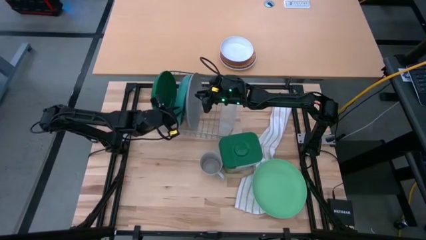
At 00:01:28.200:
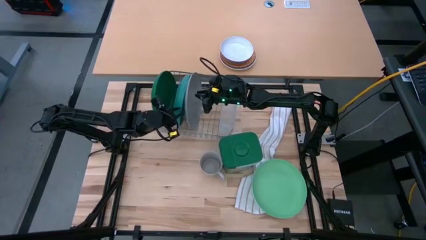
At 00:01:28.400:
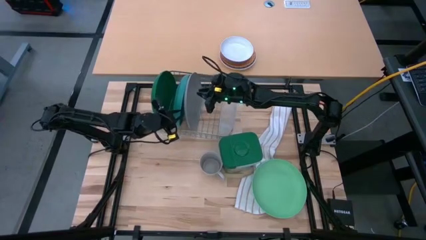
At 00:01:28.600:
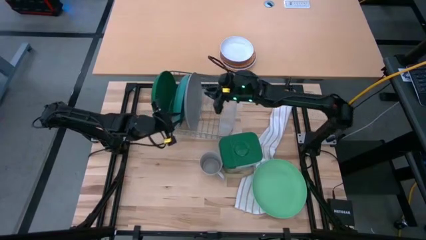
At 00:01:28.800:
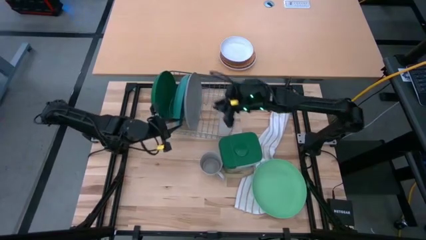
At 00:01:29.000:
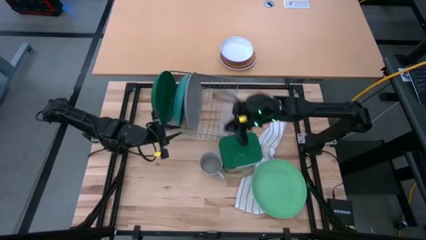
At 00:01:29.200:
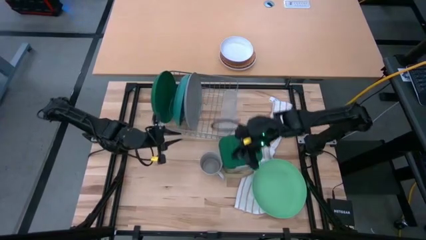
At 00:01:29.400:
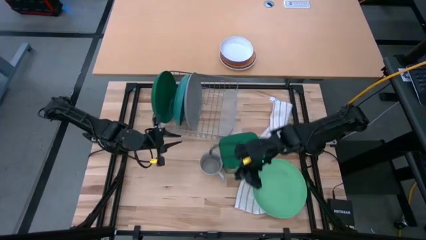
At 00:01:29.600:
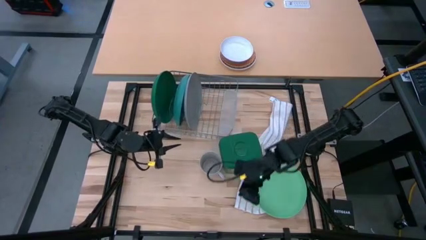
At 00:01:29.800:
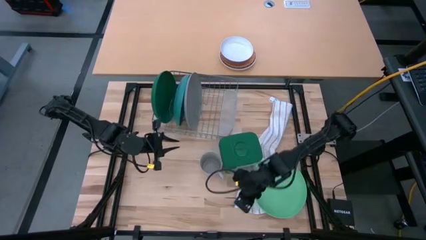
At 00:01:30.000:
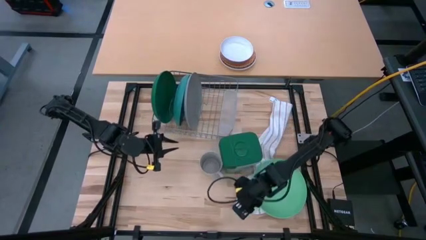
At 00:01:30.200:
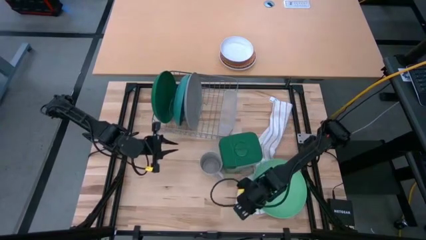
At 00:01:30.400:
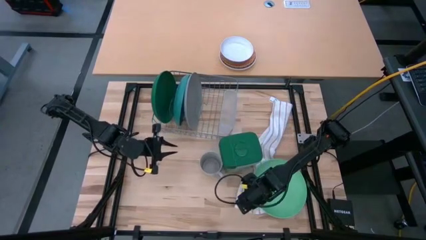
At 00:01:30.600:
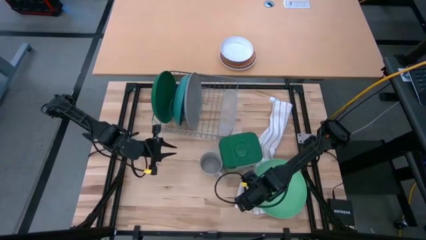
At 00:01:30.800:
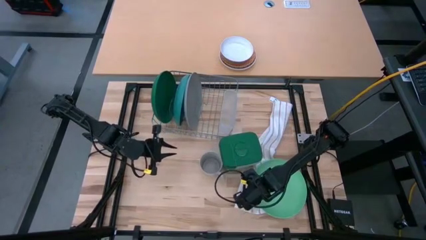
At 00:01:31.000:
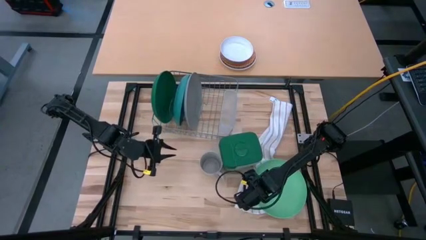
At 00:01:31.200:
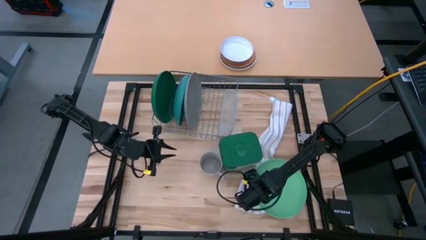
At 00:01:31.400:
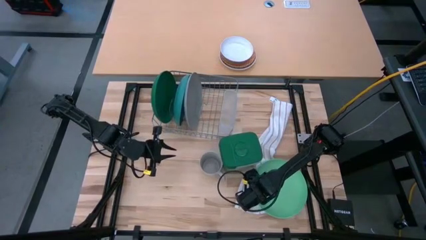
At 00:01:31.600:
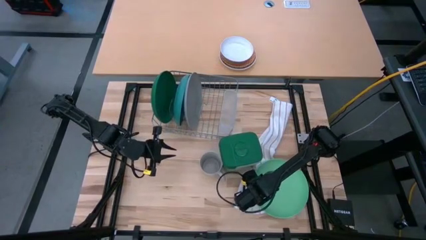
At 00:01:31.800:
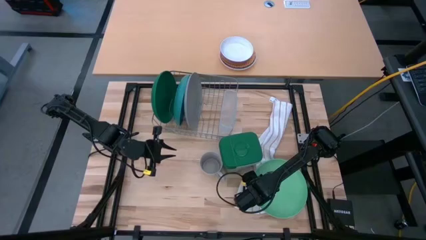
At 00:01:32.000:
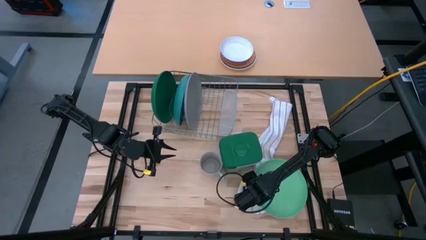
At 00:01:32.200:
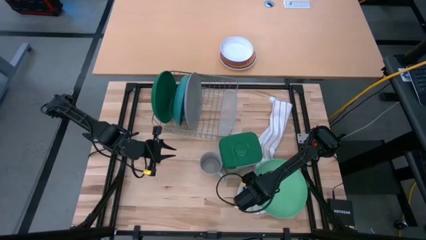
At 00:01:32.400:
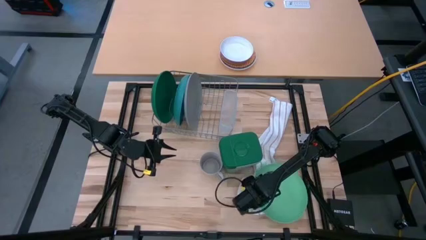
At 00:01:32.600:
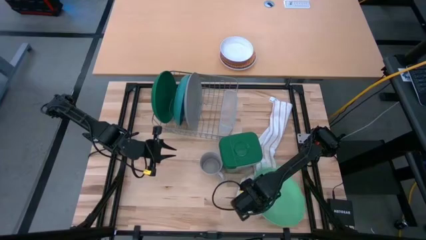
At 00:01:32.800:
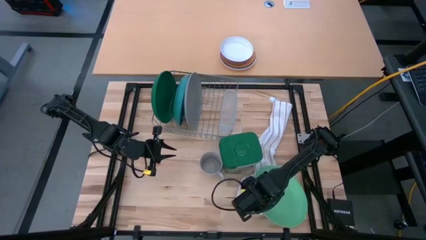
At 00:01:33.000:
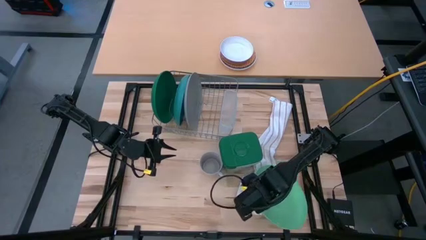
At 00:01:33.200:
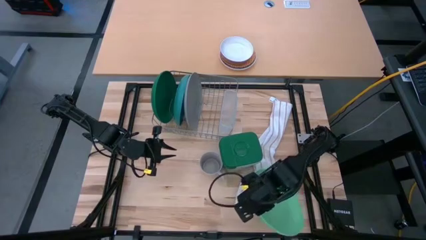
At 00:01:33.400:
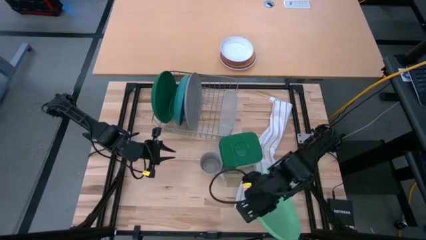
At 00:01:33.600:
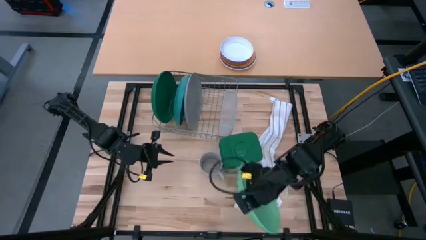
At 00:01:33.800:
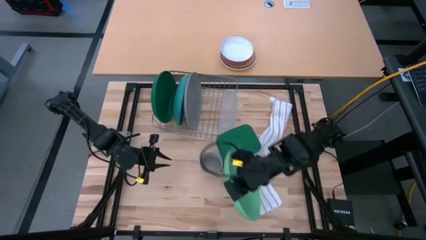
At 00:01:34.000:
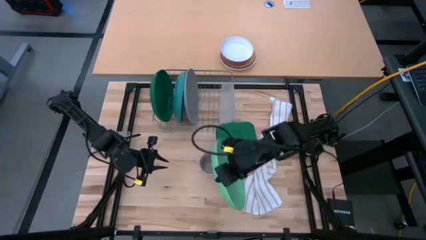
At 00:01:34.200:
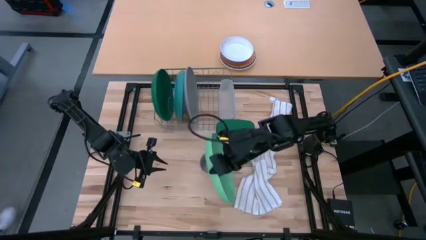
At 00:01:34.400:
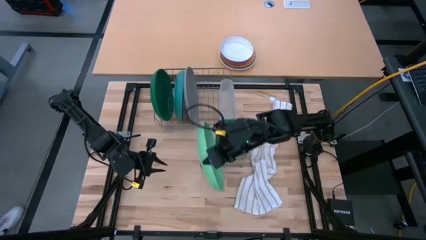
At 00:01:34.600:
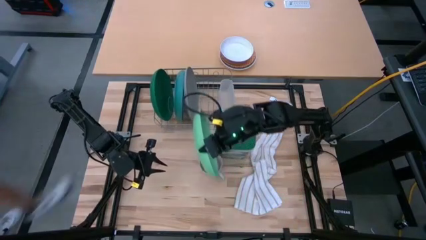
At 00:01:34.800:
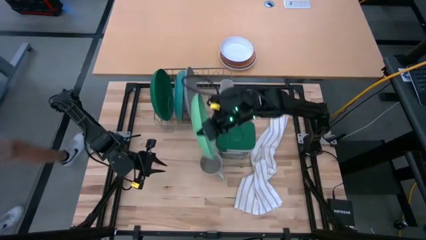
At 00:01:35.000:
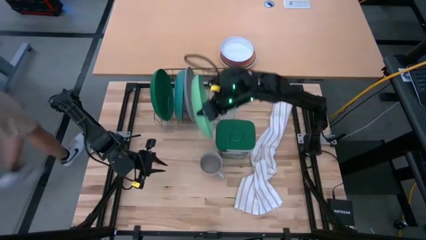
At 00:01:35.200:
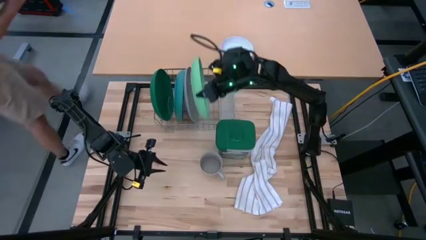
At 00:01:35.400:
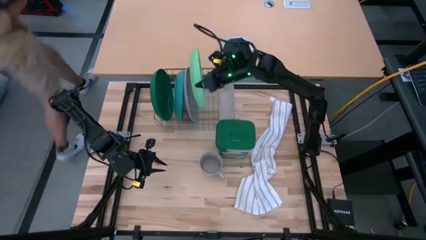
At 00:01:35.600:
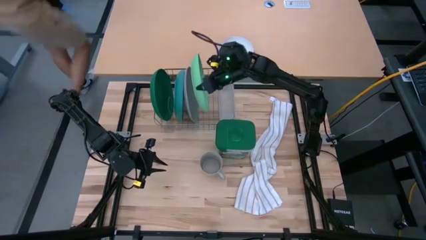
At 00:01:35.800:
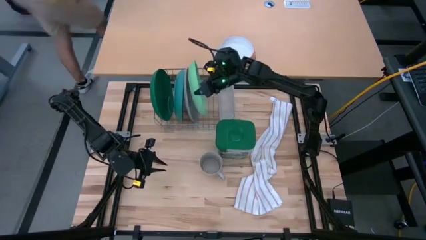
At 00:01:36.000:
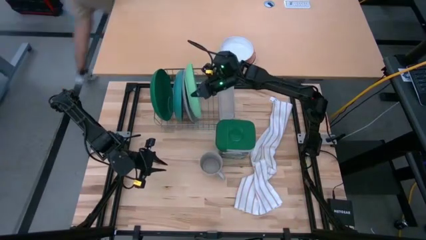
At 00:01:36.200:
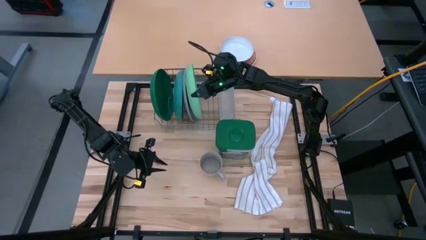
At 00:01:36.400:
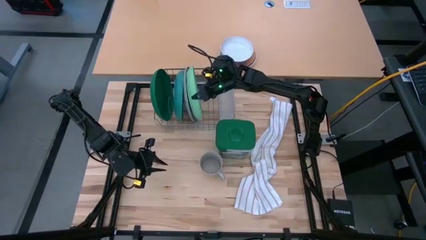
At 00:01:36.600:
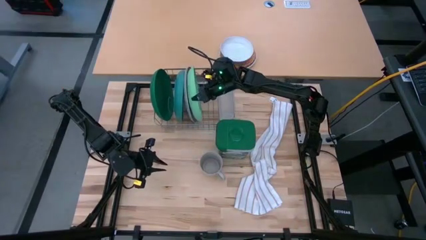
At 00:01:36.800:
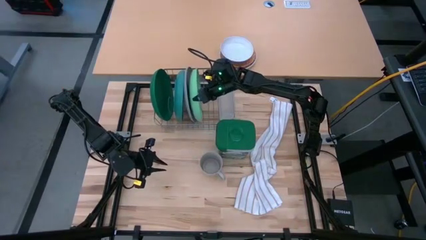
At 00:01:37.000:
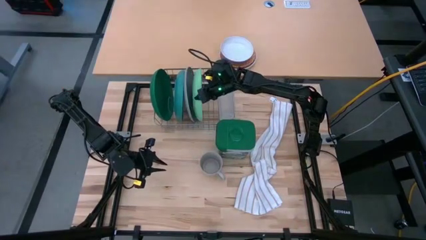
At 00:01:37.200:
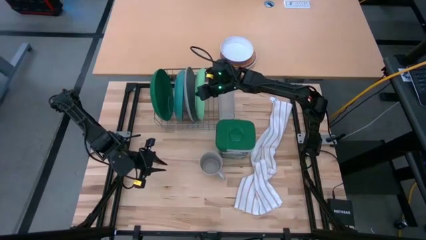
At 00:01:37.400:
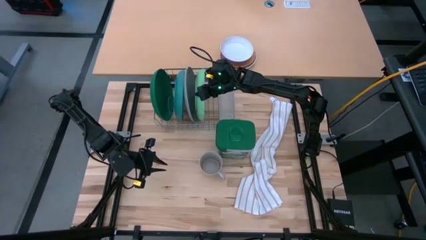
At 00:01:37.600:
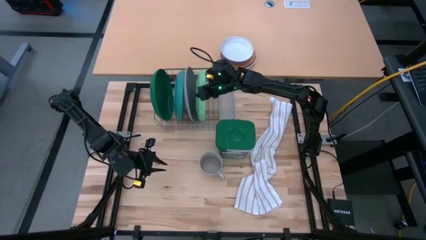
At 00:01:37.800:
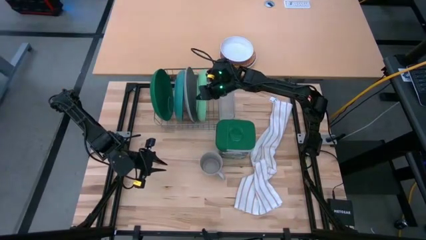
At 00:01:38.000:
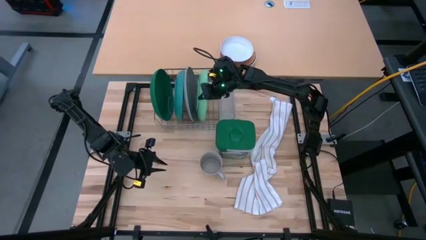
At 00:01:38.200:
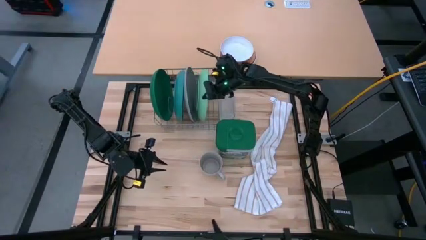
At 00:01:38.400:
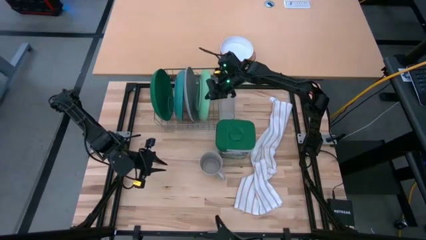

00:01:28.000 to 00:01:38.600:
Task: Sort dishes
Put the light green plate in the dish rack

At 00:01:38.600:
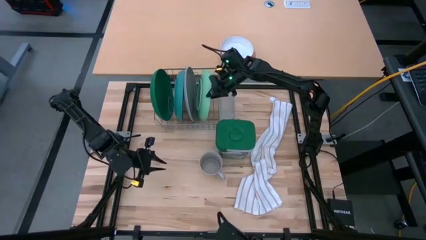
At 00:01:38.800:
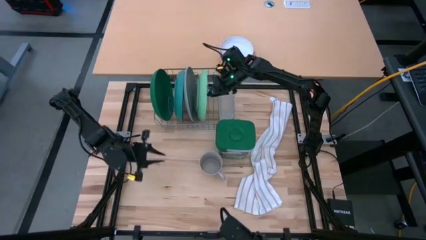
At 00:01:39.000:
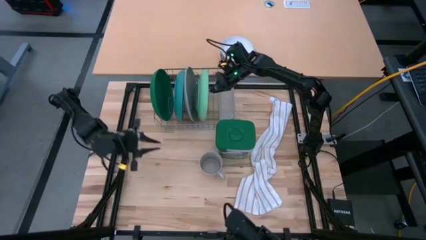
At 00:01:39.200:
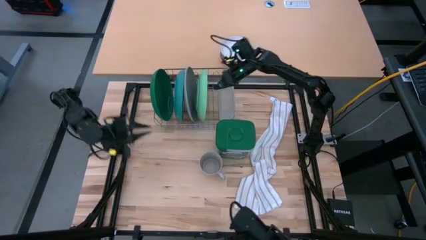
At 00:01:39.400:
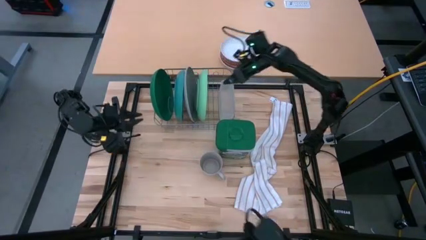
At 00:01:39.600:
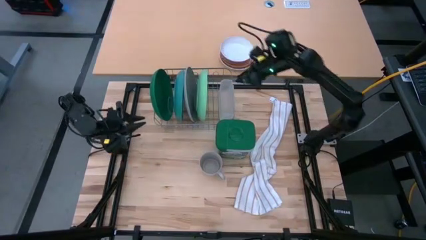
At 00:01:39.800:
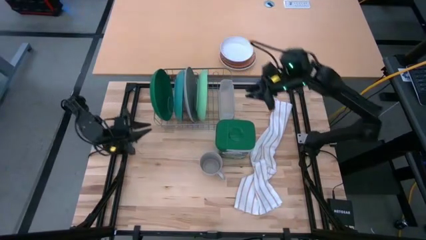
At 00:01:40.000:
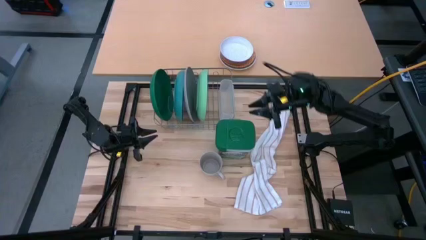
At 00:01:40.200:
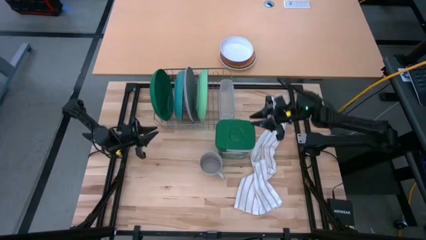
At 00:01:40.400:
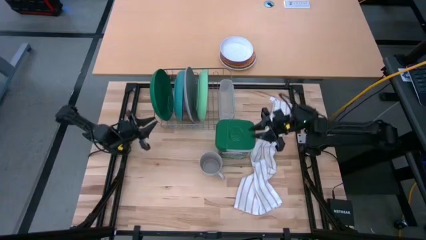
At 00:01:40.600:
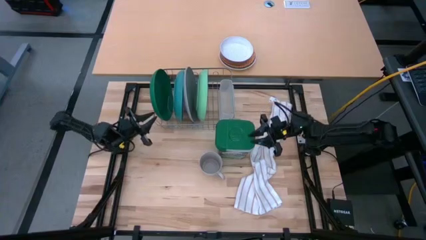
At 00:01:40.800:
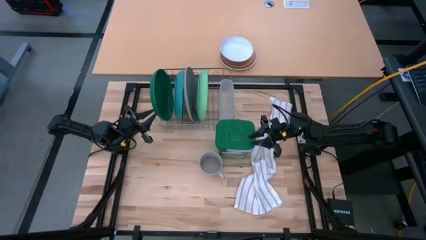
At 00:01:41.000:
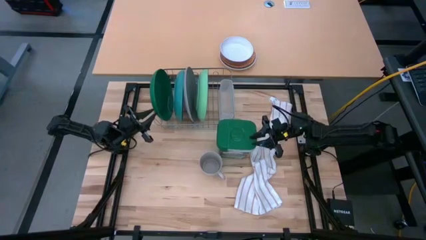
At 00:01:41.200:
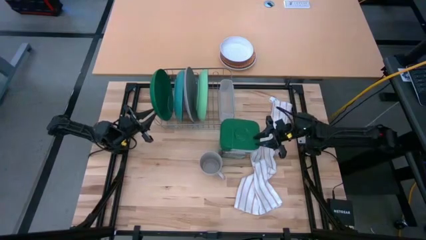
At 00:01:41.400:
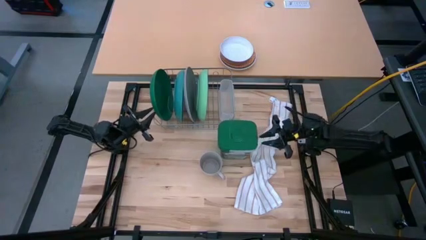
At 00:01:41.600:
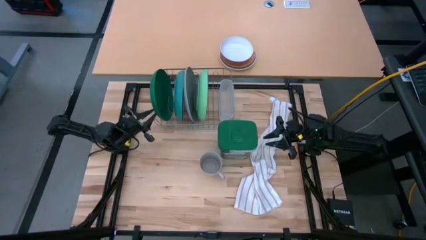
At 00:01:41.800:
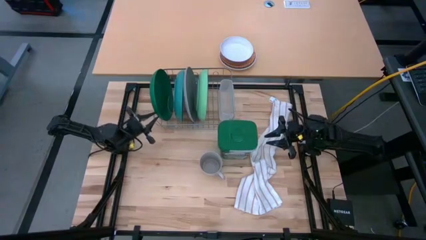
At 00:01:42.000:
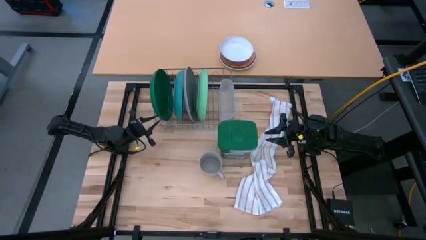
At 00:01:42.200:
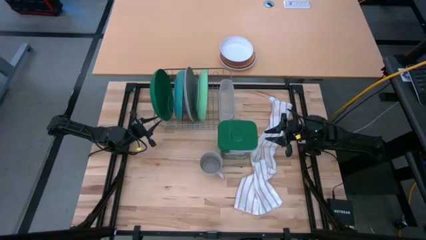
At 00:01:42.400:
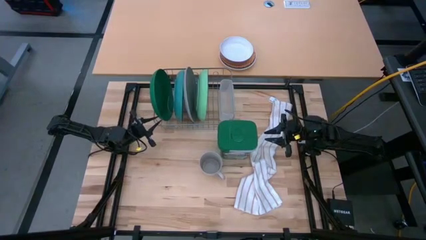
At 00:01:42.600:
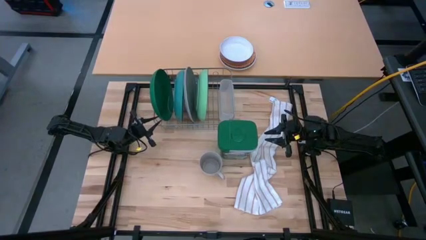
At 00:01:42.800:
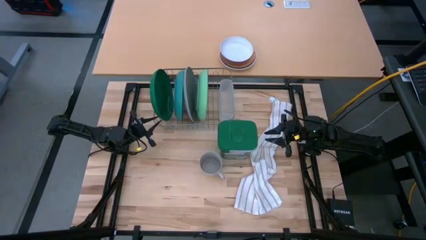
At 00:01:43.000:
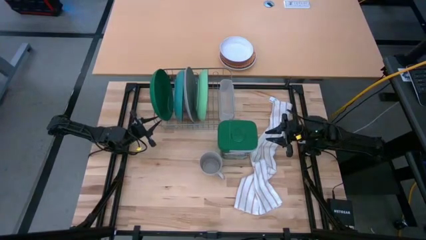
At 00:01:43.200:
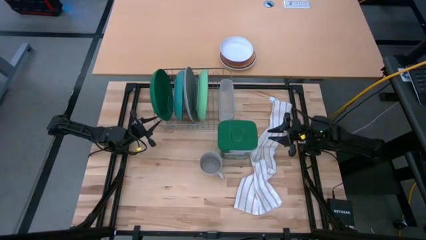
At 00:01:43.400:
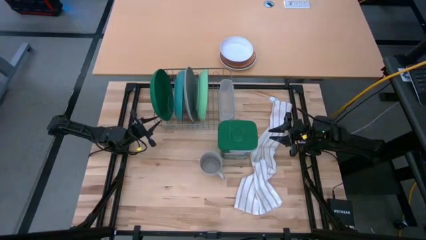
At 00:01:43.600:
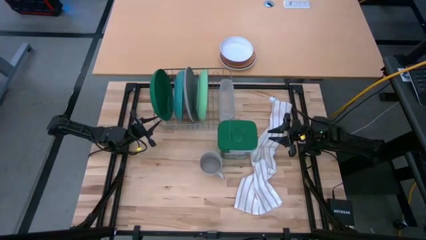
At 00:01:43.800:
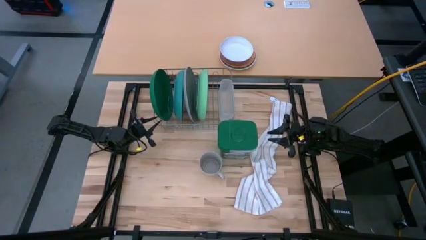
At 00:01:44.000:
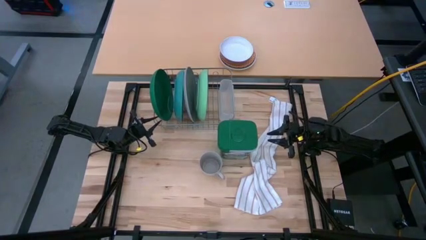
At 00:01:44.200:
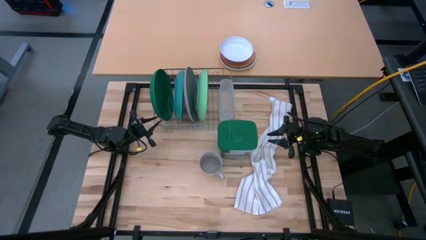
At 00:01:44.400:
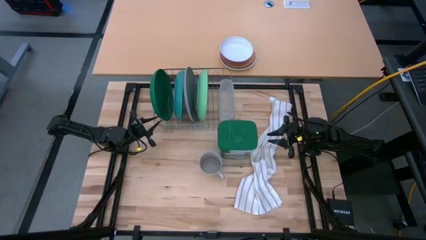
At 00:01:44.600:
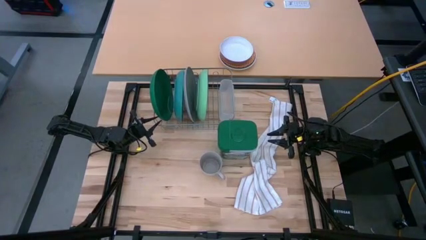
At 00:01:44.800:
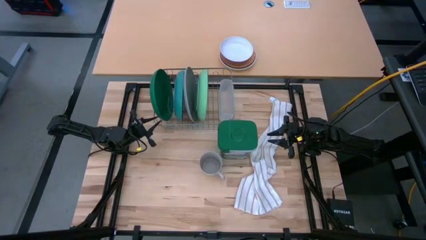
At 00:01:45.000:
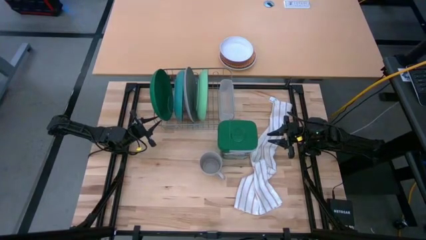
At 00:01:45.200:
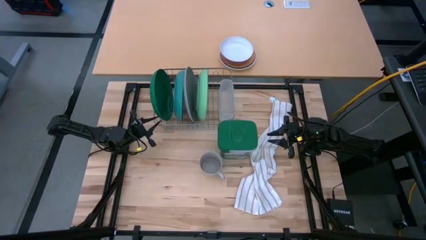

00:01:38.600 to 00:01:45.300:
Return to Home Position
